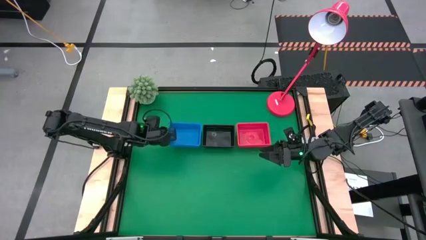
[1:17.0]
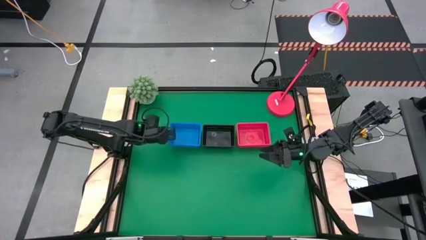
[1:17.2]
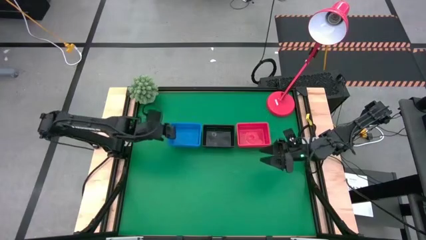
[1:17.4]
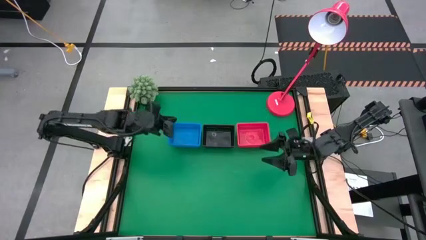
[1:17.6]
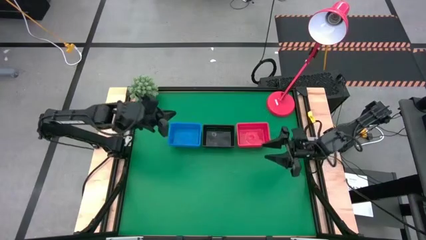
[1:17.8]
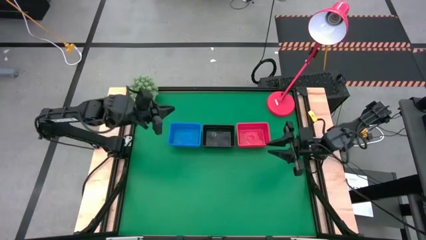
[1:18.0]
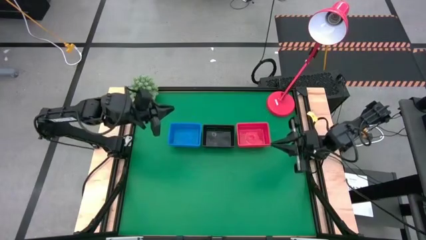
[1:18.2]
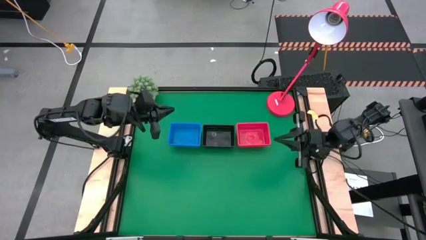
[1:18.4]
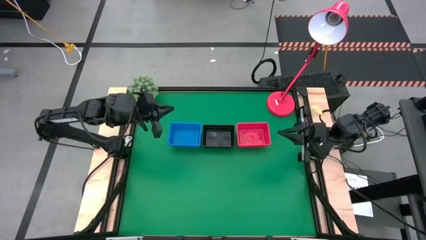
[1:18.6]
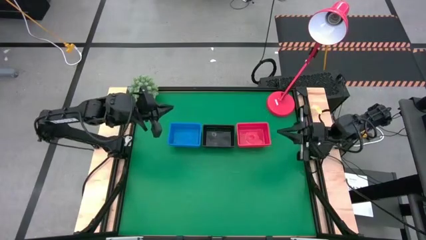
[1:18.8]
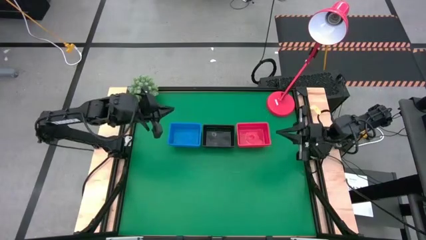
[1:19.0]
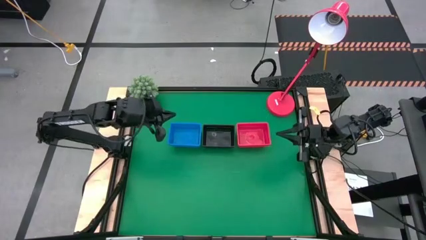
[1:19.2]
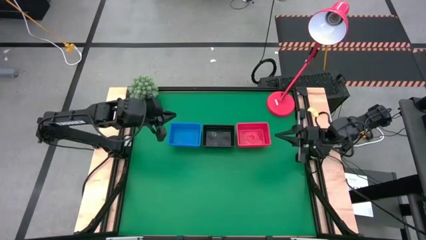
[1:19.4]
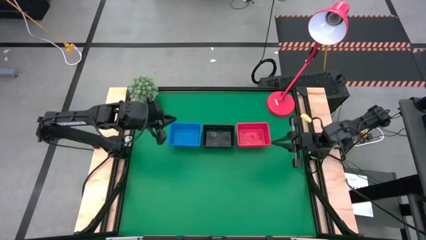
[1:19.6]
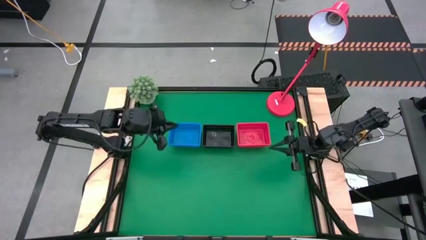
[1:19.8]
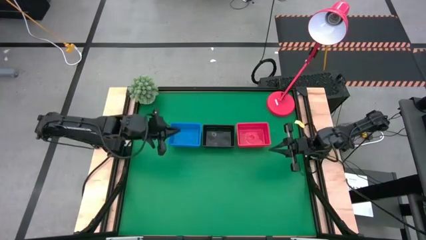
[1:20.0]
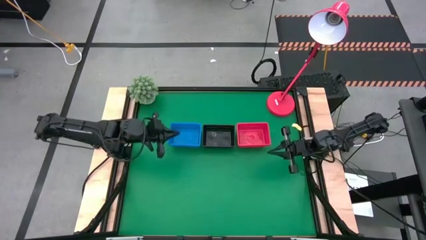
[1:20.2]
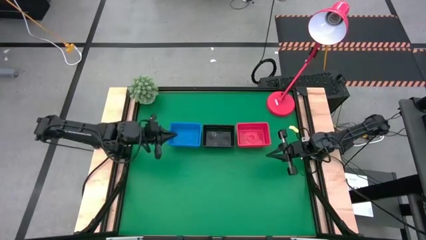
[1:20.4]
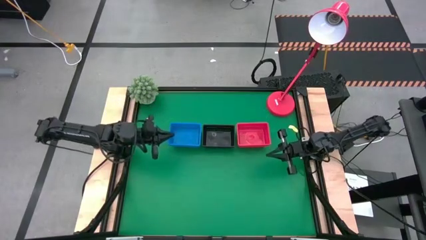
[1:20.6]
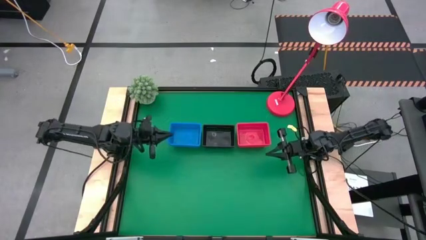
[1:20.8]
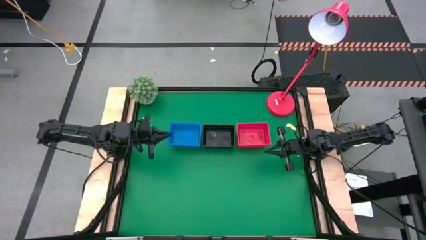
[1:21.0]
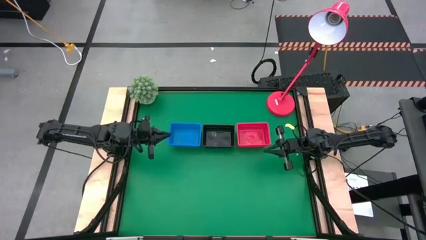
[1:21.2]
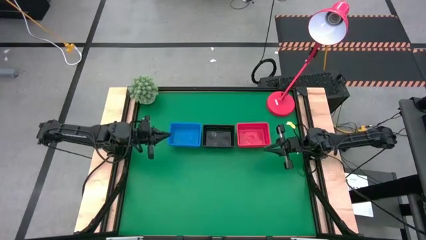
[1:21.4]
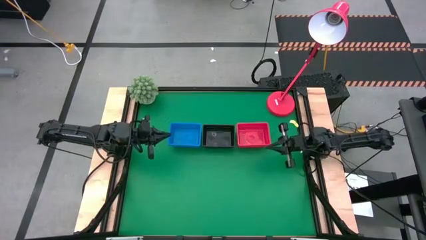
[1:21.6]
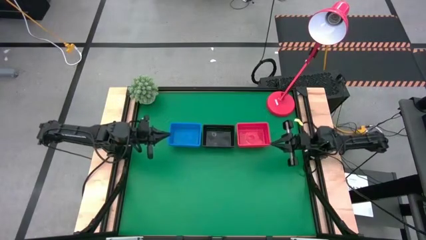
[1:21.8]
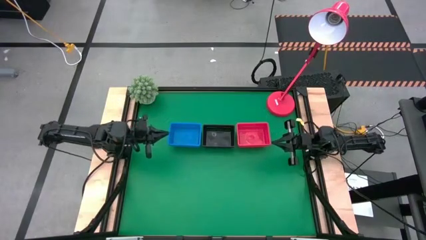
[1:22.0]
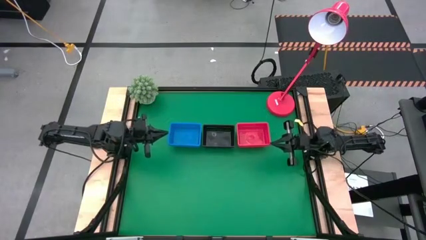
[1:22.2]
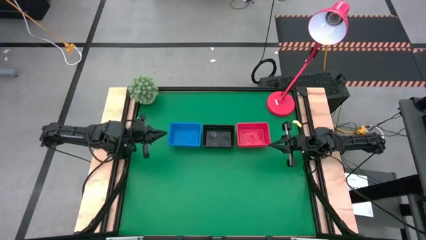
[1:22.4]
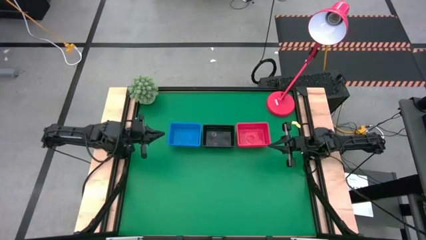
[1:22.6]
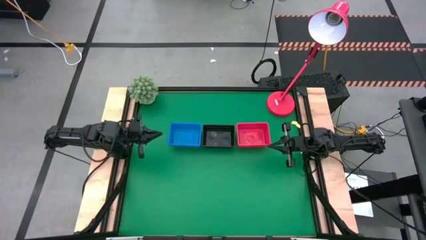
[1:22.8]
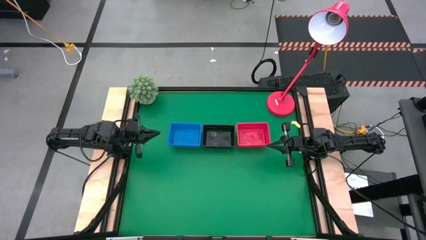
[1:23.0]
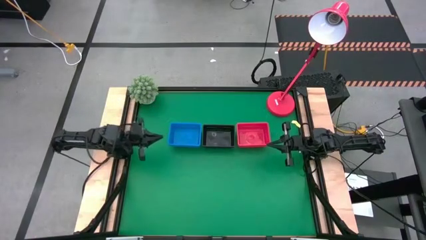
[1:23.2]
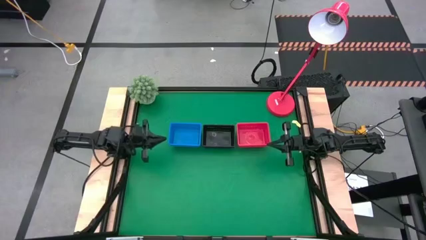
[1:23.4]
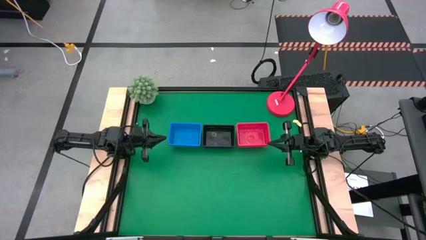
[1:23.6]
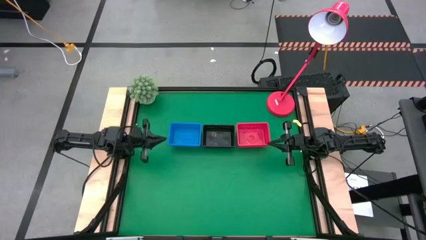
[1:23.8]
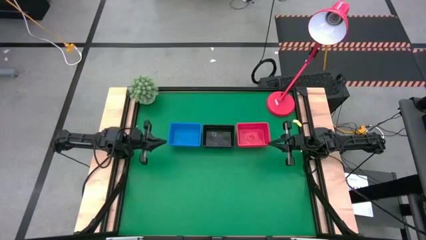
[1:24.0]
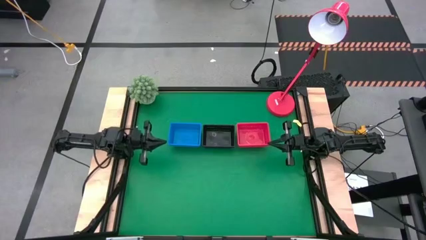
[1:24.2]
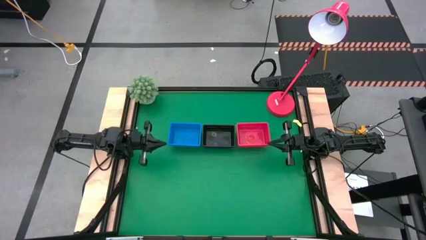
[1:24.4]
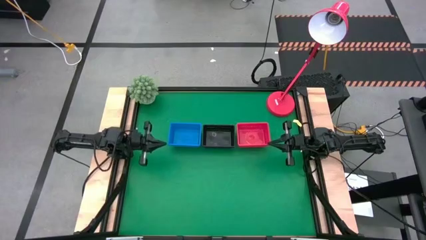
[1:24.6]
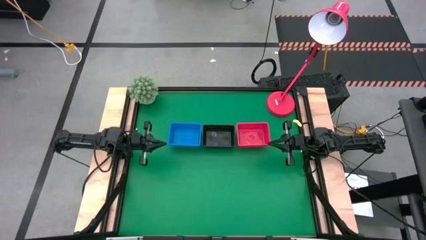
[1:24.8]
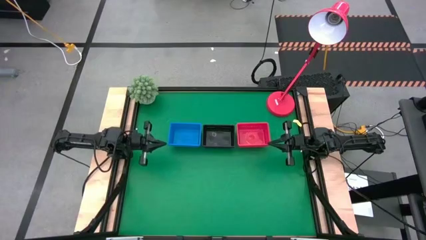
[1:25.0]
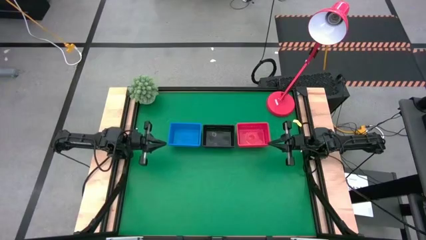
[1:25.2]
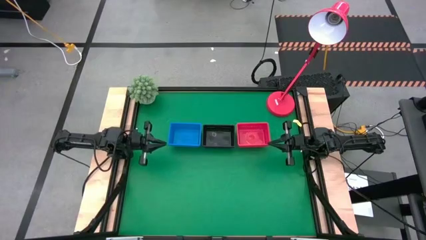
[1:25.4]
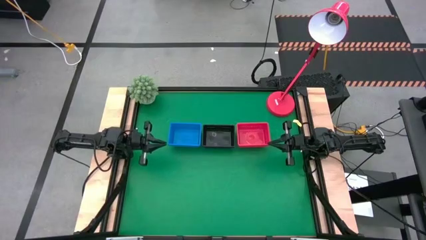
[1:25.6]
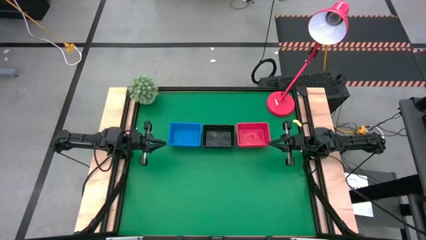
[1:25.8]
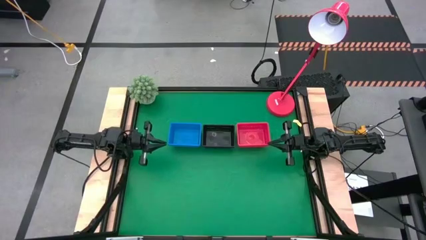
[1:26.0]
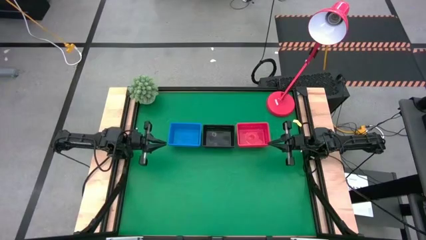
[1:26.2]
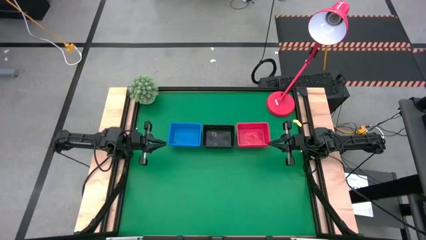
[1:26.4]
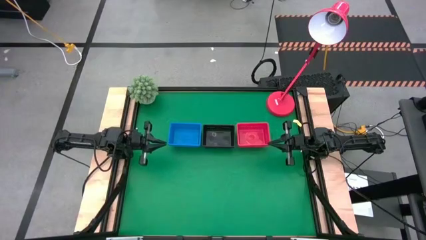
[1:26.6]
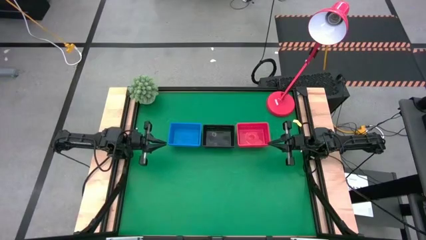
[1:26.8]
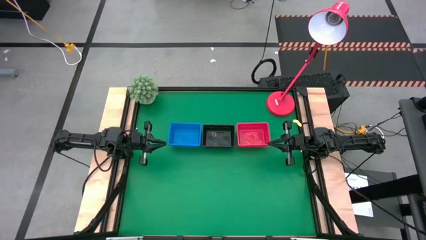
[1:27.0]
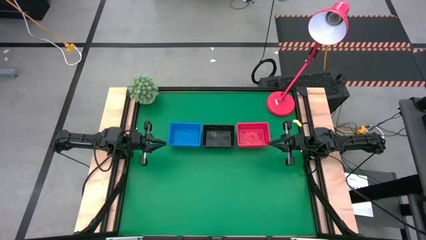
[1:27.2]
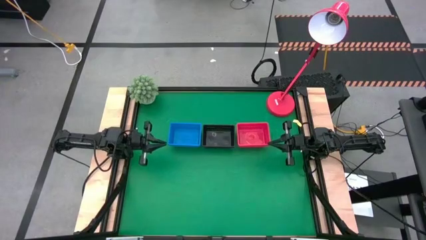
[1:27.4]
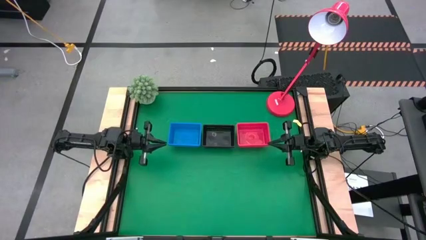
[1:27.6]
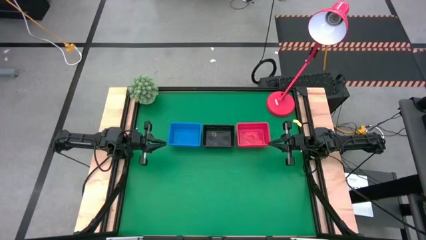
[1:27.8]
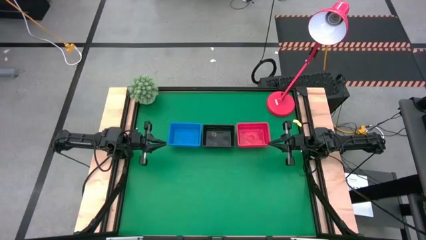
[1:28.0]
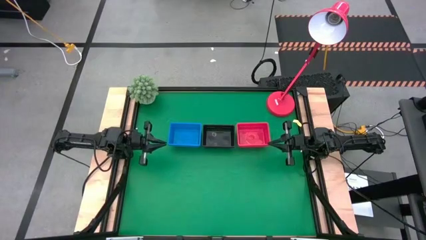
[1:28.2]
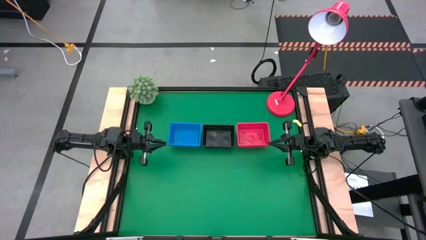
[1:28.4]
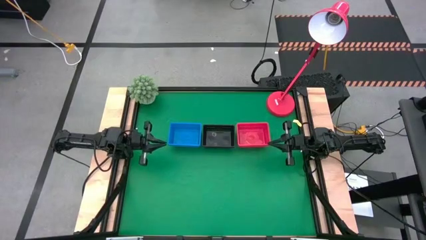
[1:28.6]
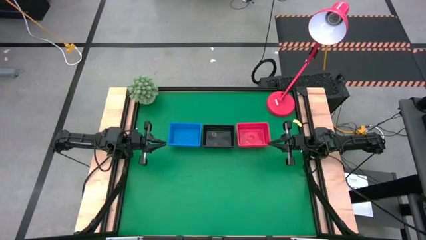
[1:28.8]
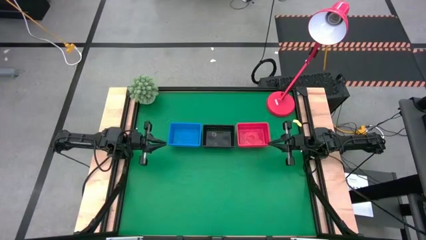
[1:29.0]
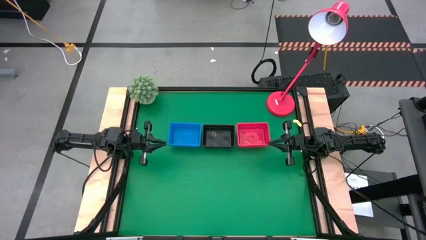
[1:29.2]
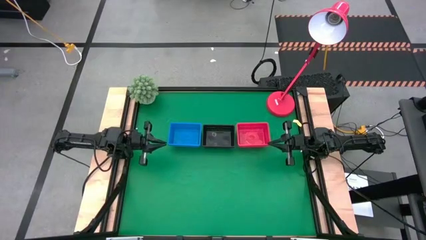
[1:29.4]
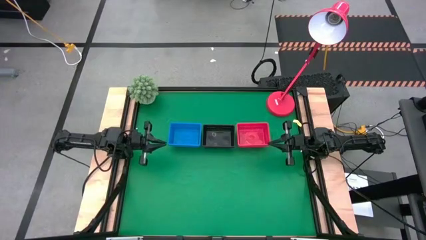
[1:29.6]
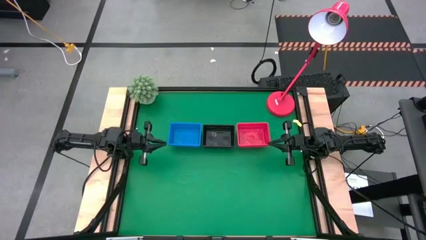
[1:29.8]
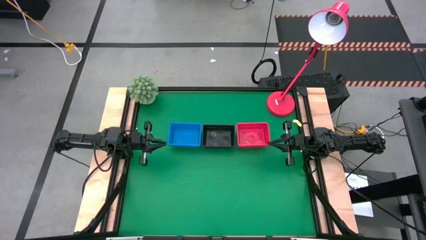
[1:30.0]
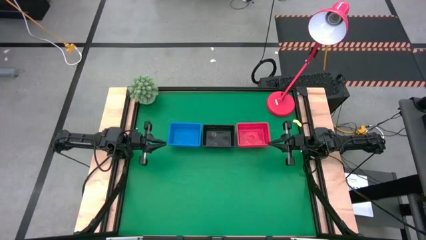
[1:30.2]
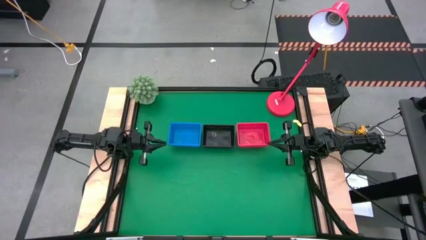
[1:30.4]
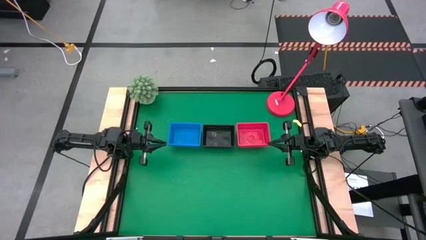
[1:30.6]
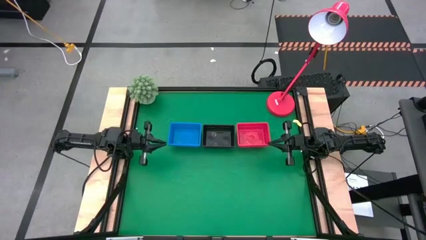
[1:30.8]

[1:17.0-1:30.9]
Return to Home Position
